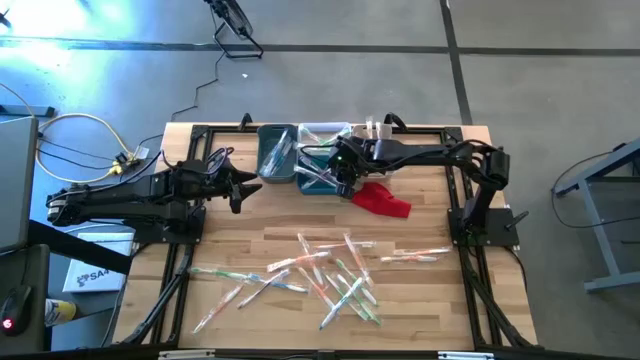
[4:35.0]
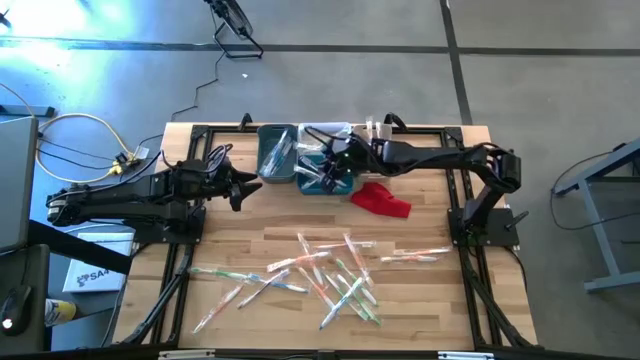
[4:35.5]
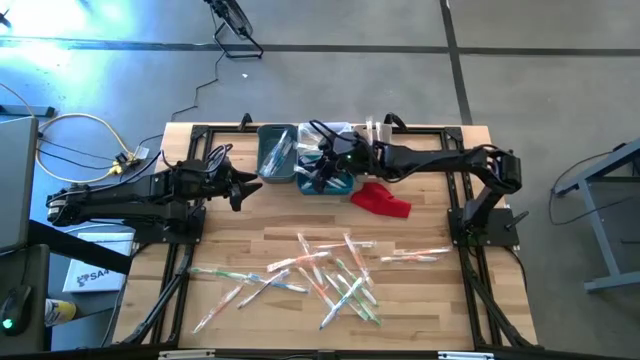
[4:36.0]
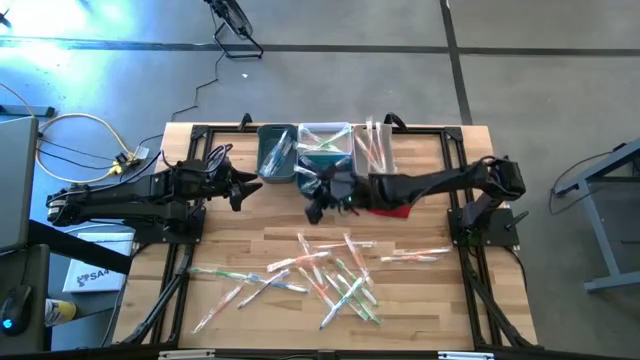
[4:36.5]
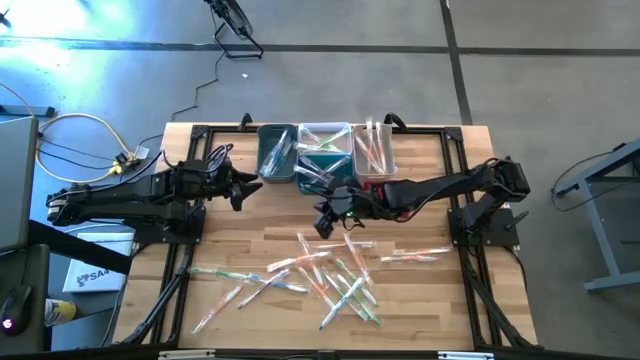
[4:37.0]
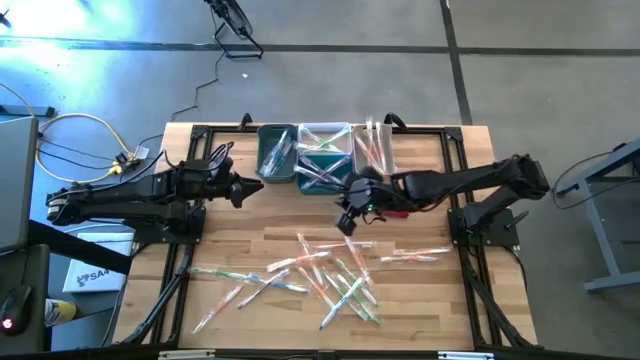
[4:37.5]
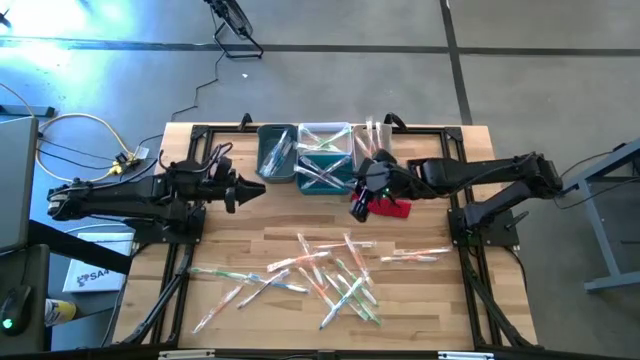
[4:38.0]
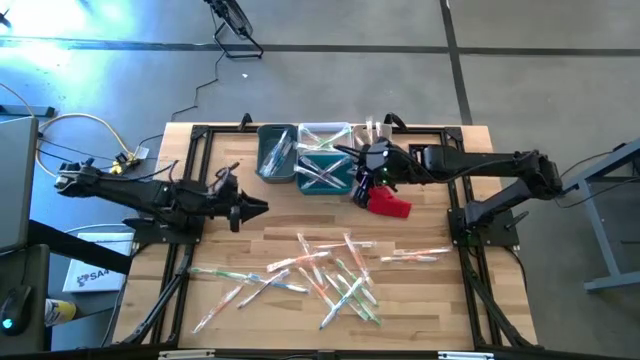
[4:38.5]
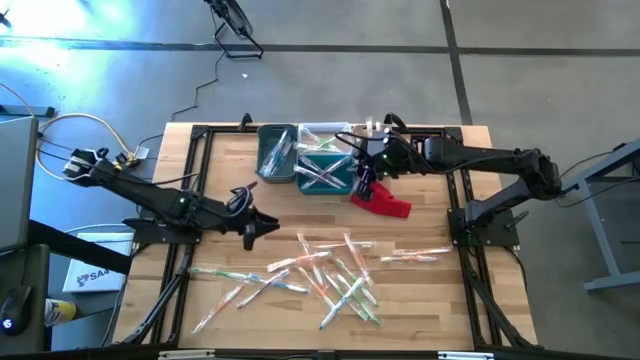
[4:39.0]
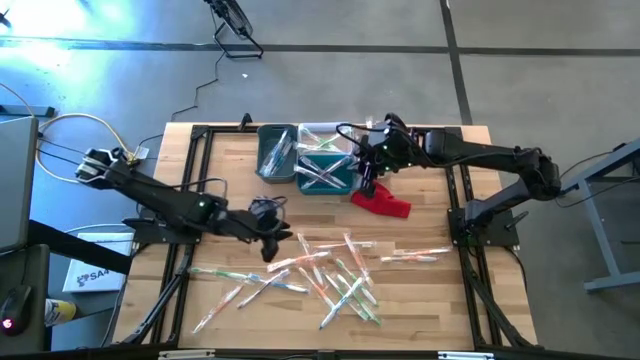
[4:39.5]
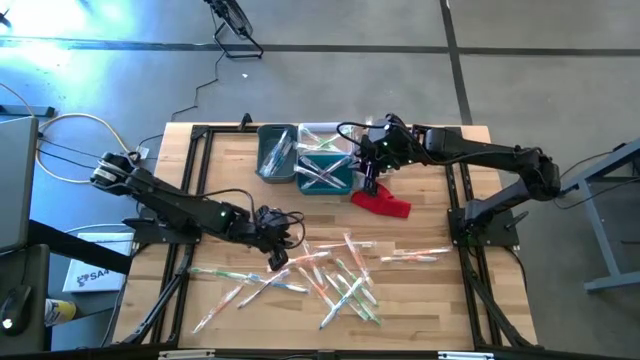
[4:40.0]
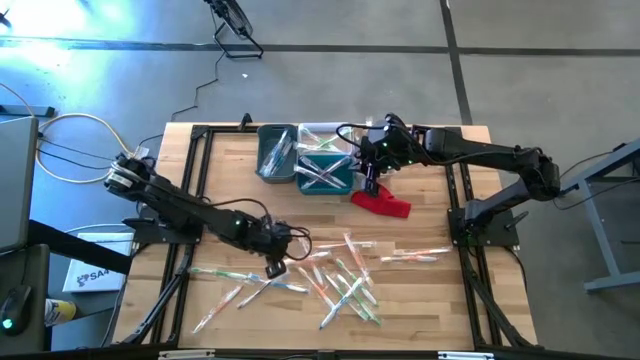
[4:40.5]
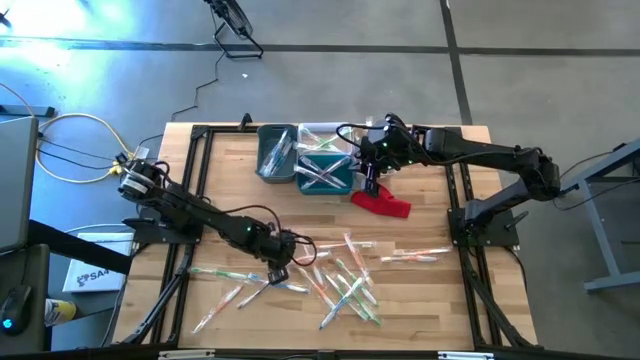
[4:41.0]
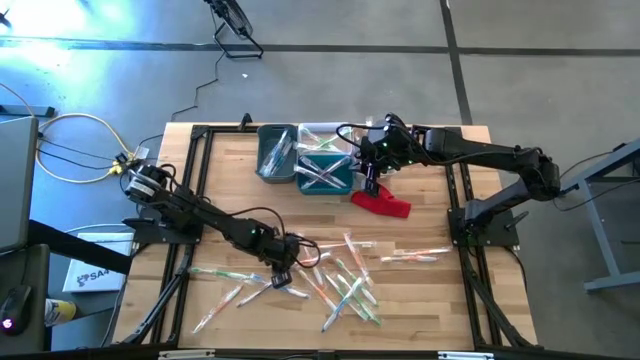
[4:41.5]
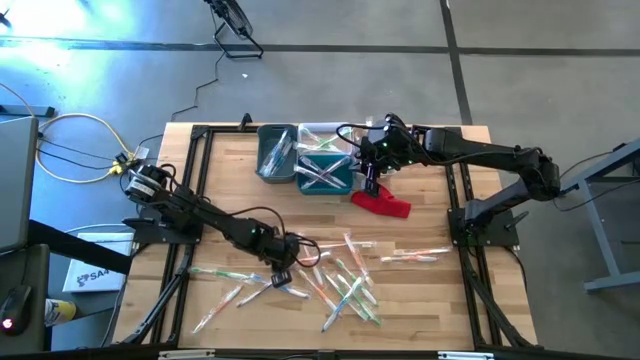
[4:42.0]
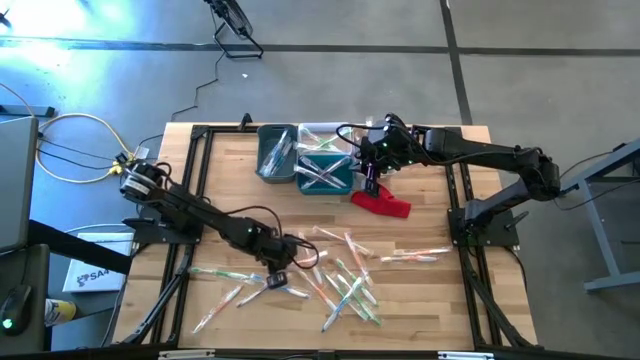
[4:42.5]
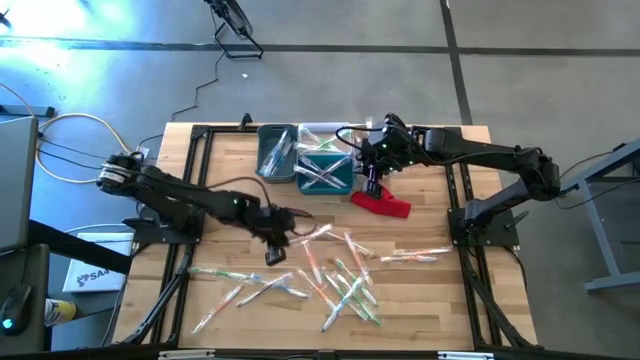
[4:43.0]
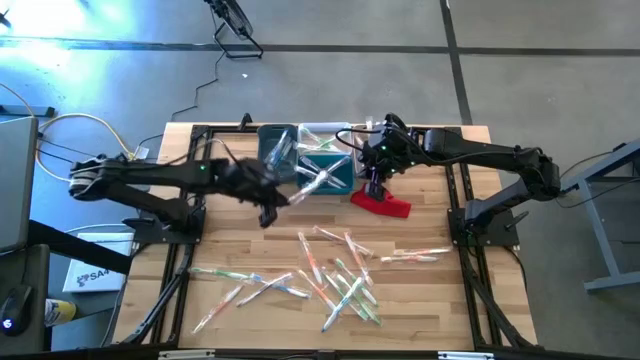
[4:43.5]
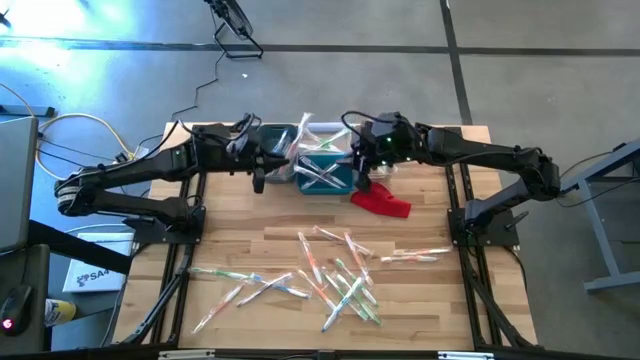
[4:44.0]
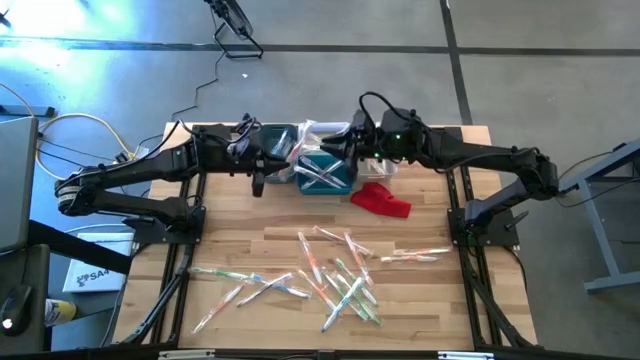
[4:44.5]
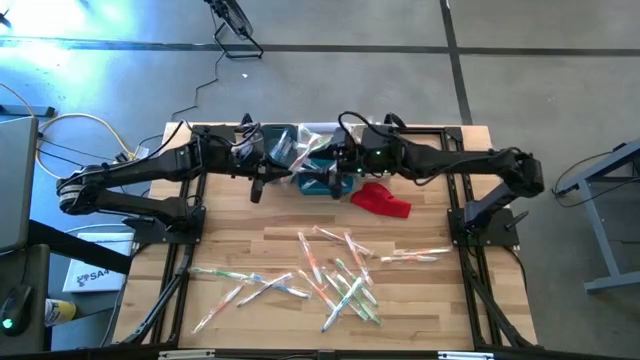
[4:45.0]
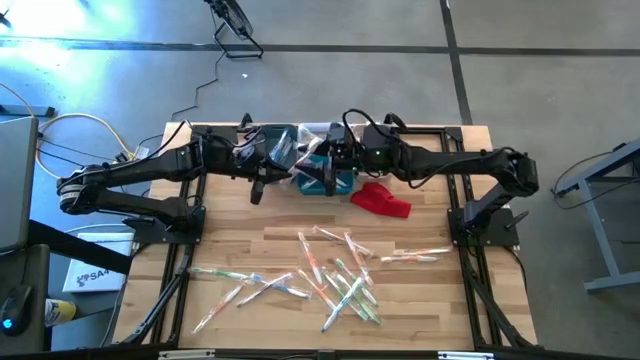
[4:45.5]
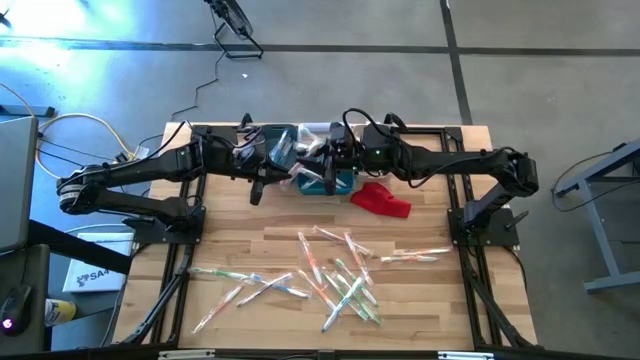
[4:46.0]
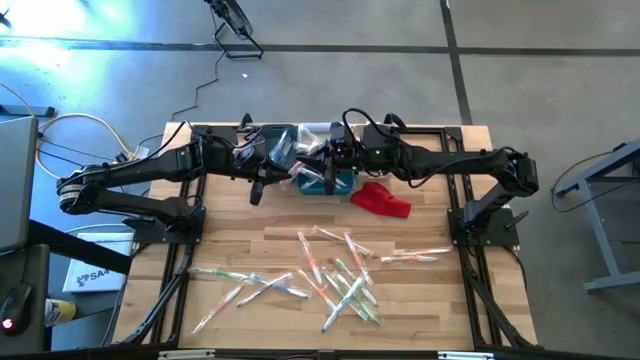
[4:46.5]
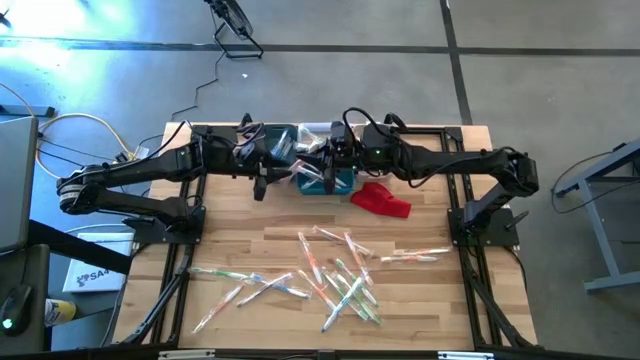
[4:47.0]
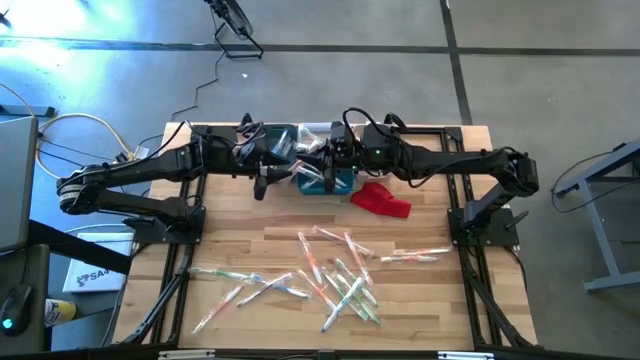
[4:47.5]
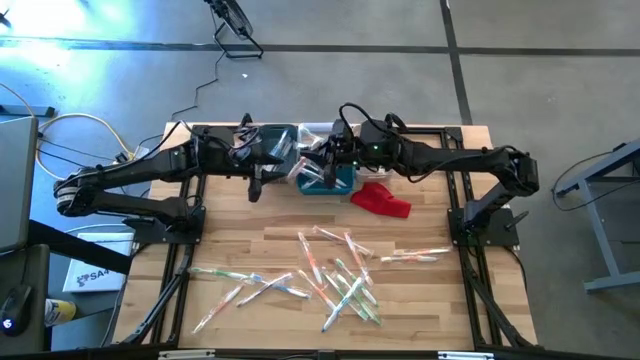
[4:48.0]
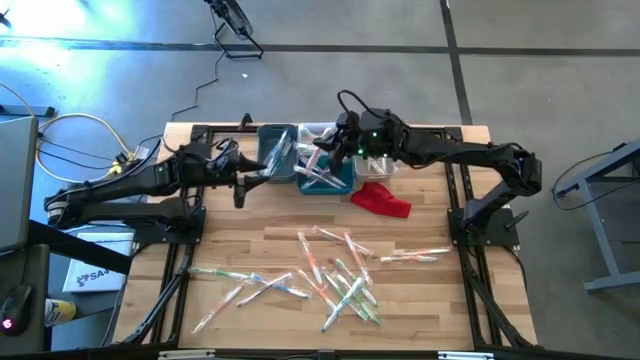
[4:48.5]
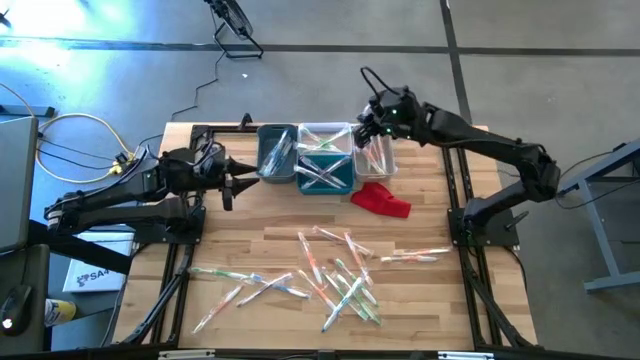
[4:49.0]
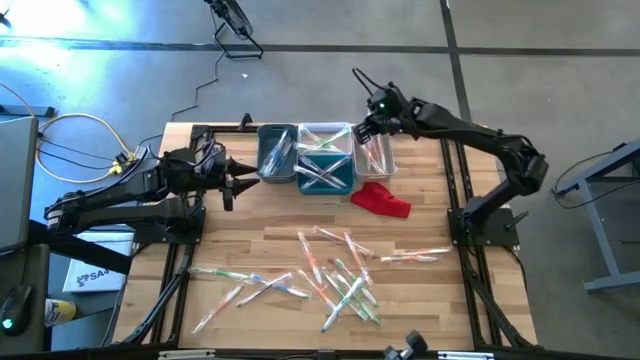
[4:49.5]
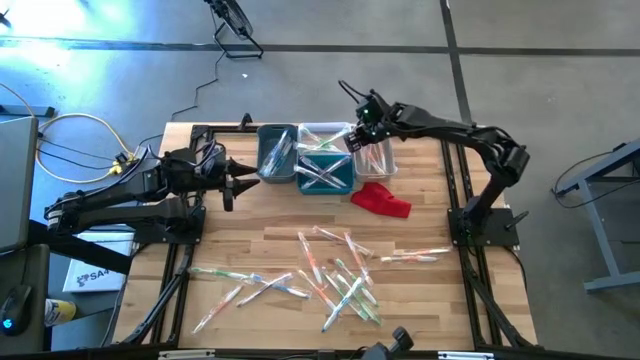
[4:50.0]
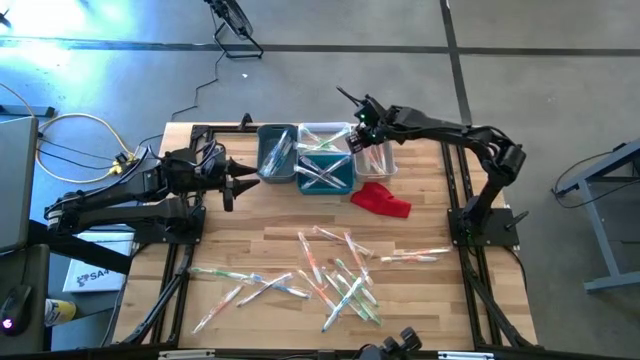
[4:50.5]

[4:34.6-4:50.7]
Task: Pick & Place Toothbrushes
Put the orange toothbrush into the white bin

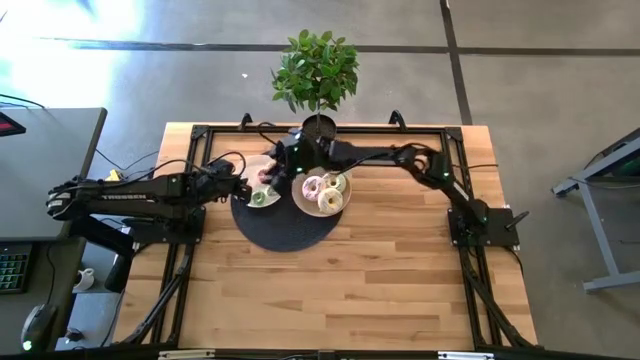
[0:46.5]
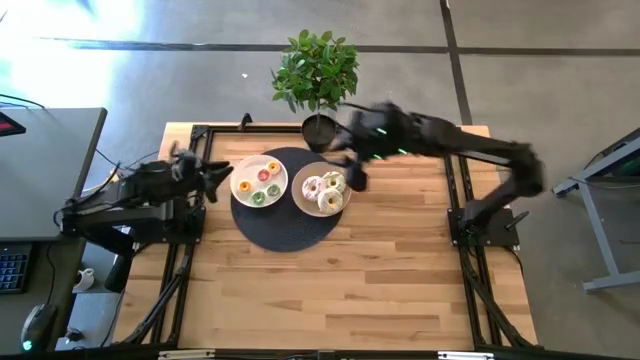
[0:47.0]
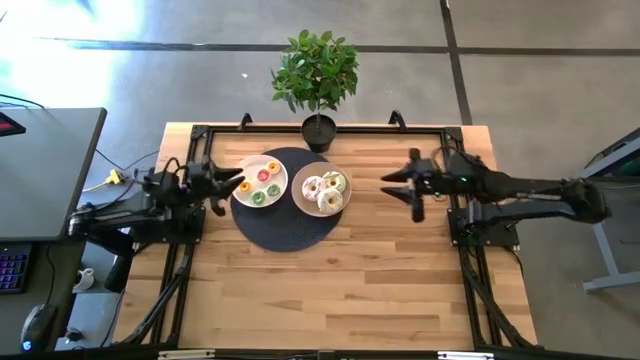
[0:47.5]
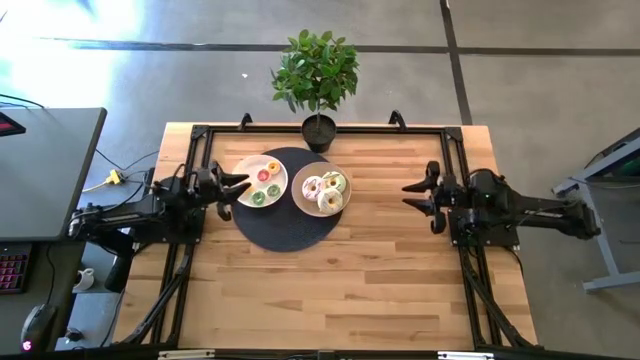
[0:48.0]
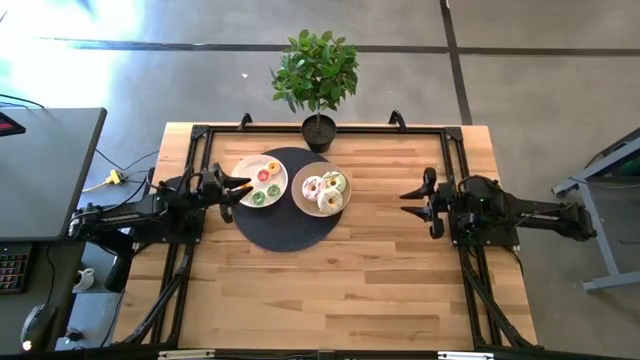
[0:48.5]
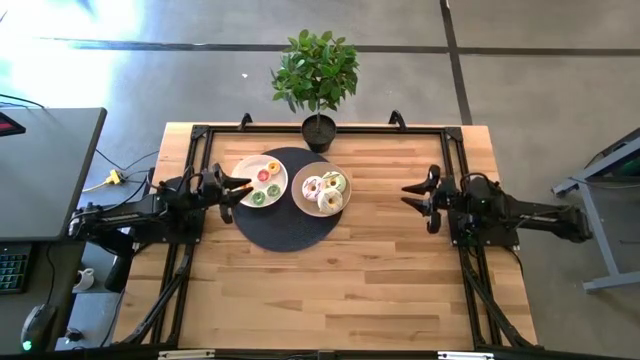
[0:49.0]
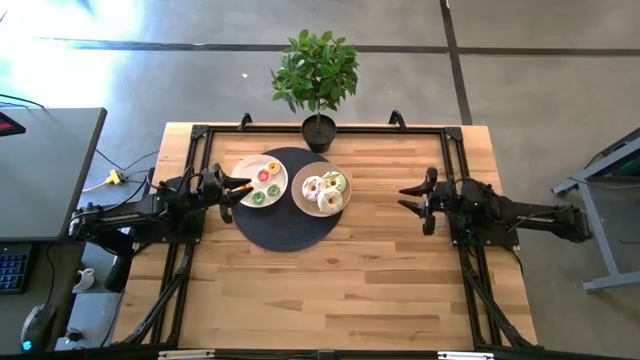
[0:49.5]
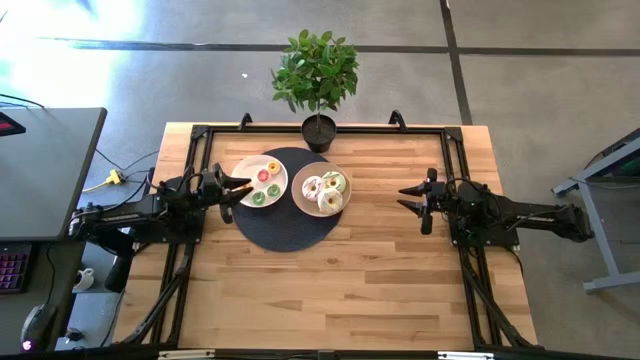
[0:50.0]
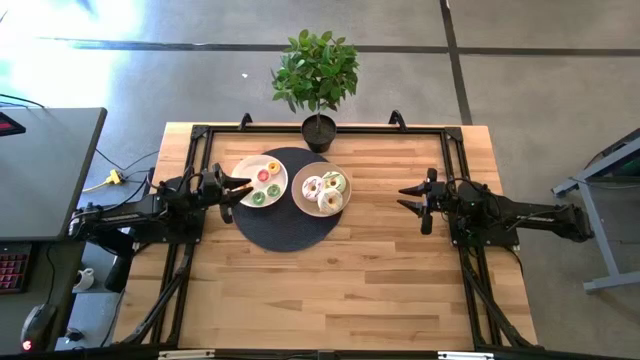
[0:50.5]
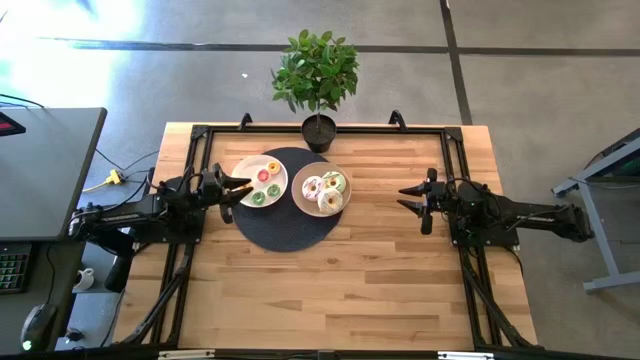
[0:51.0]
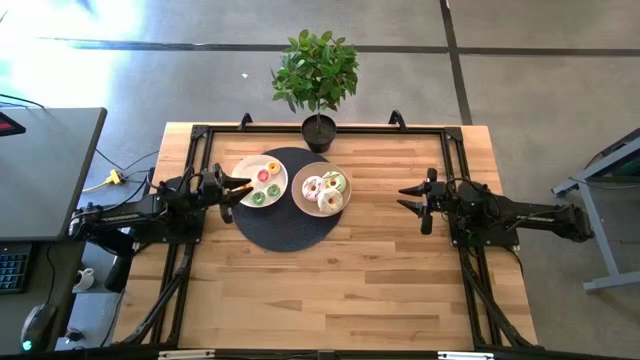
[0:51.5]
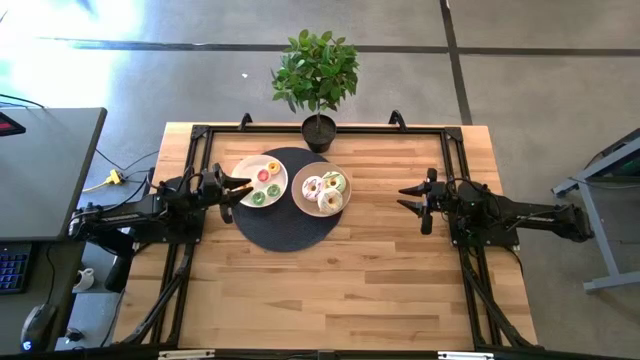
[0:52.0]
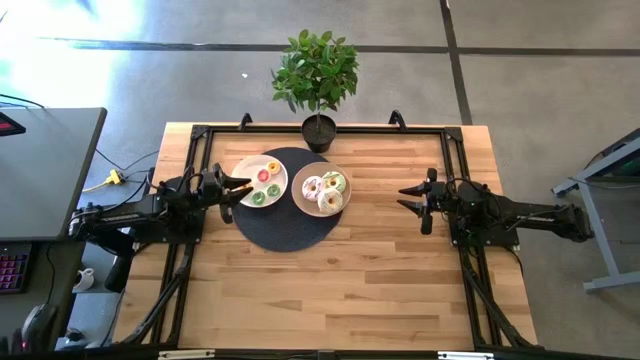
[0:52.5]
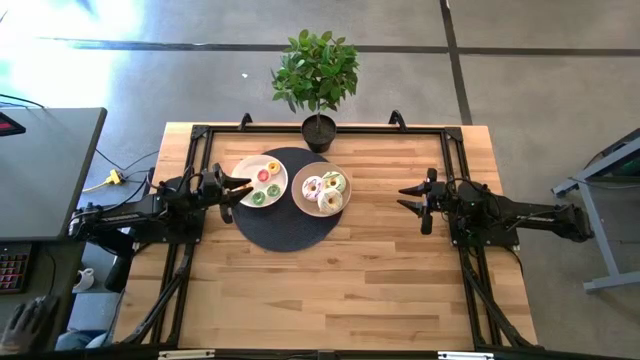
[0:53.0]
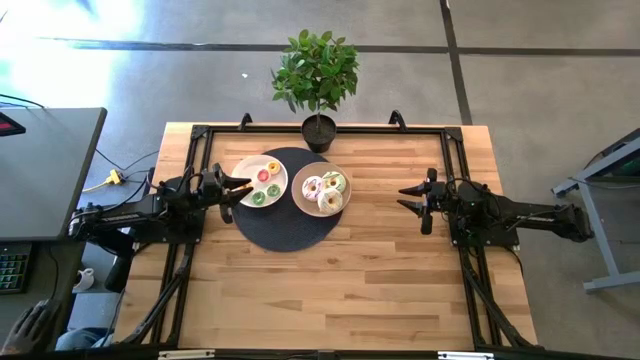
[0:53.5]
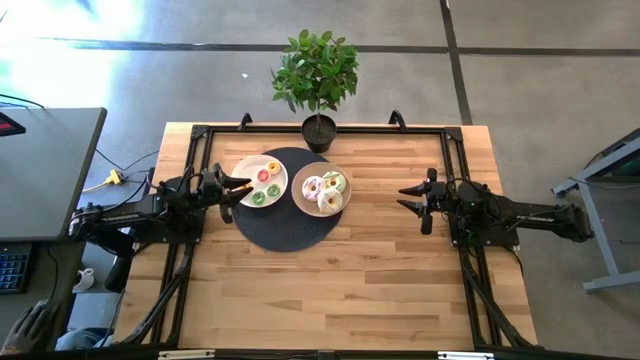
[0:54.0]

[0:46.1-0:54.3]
Task: Pick & Place donuts
Return to Home Position
